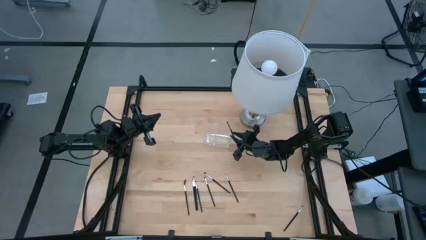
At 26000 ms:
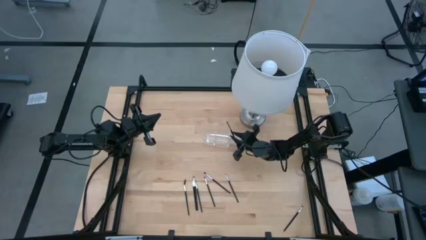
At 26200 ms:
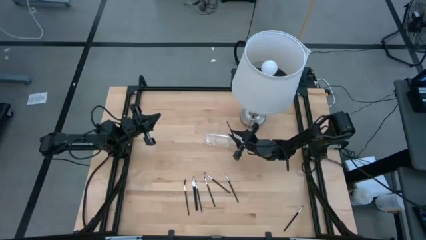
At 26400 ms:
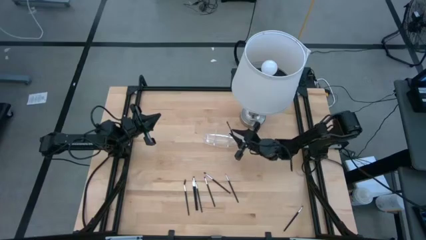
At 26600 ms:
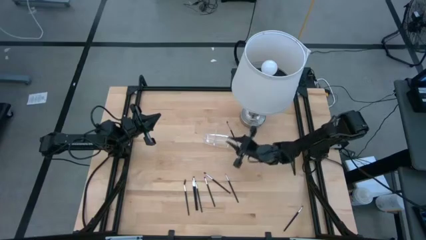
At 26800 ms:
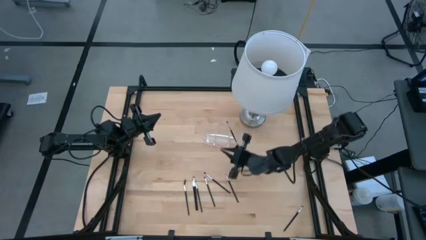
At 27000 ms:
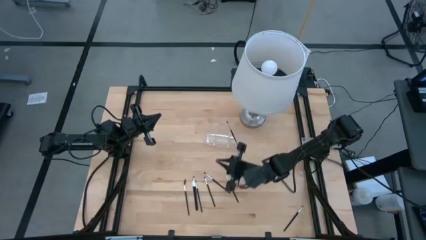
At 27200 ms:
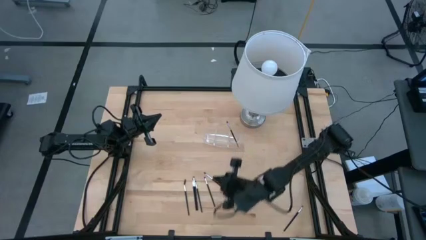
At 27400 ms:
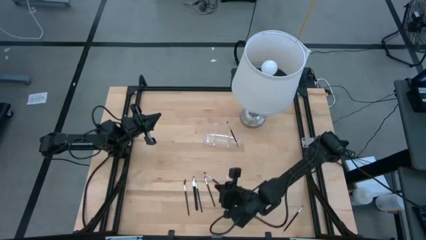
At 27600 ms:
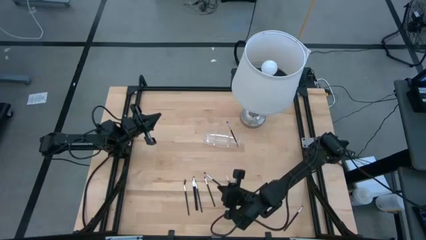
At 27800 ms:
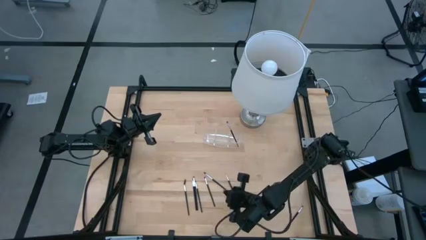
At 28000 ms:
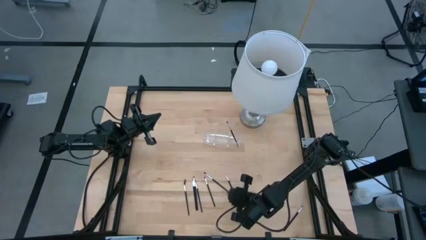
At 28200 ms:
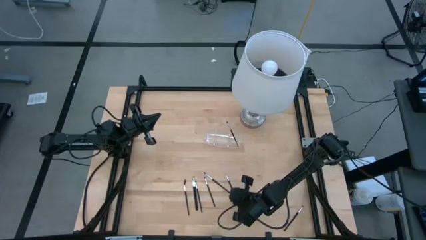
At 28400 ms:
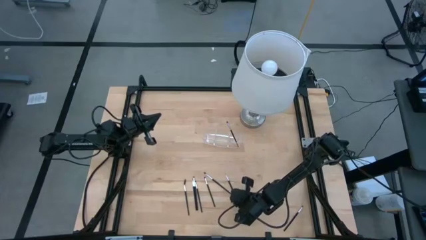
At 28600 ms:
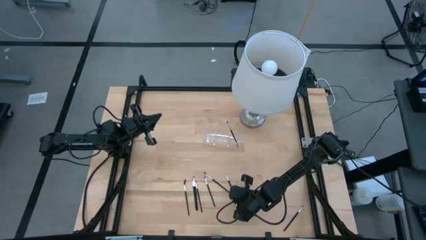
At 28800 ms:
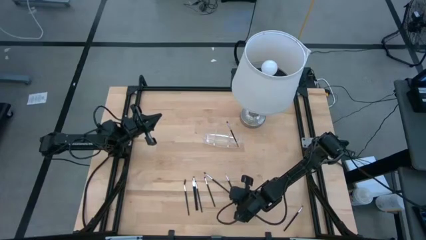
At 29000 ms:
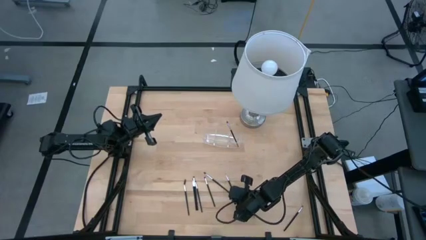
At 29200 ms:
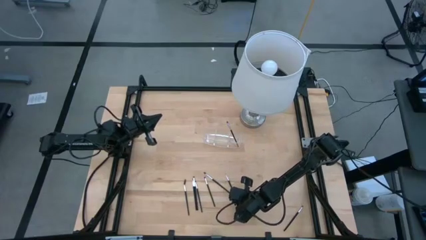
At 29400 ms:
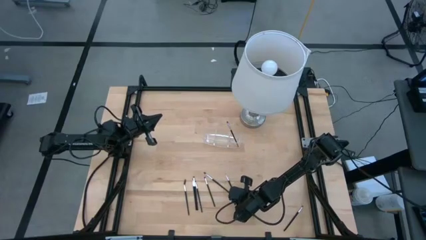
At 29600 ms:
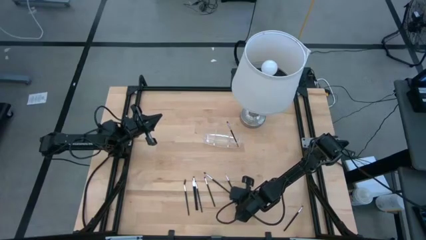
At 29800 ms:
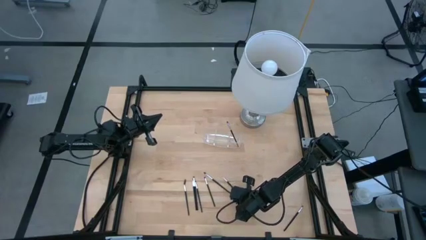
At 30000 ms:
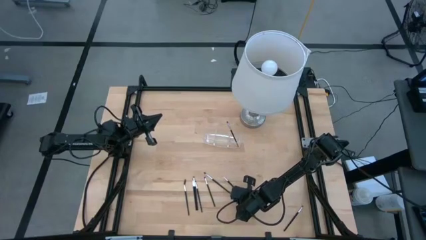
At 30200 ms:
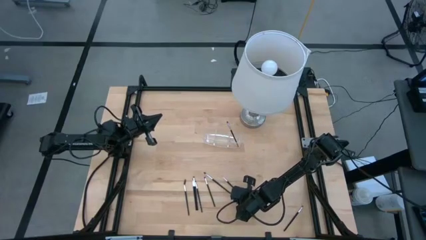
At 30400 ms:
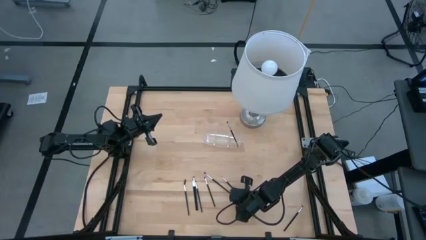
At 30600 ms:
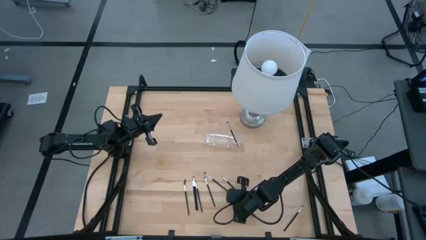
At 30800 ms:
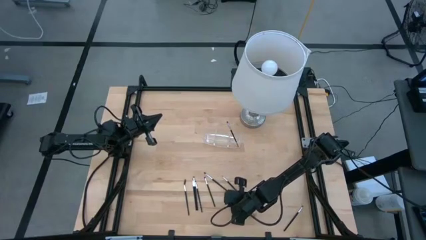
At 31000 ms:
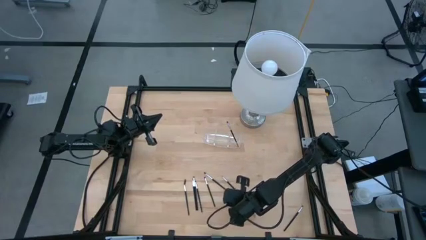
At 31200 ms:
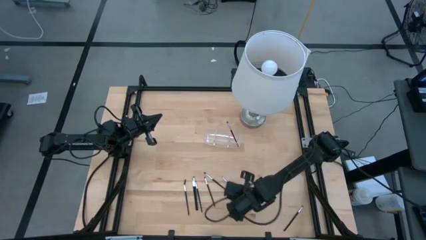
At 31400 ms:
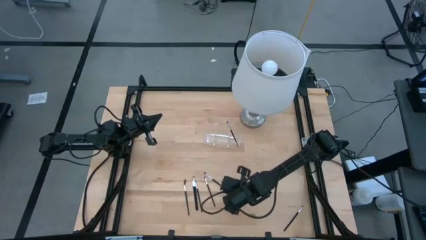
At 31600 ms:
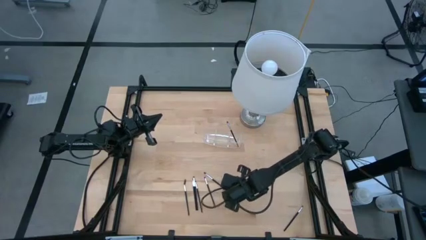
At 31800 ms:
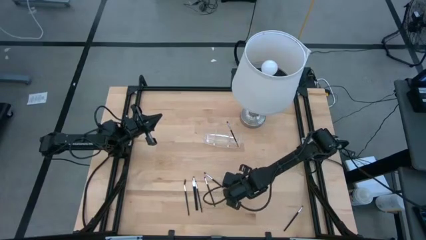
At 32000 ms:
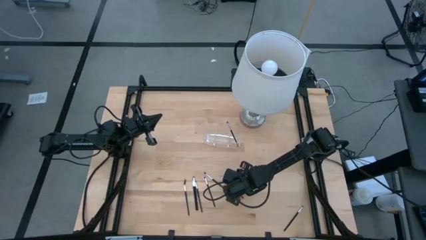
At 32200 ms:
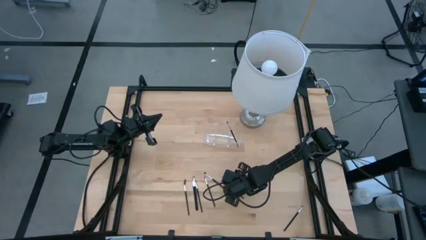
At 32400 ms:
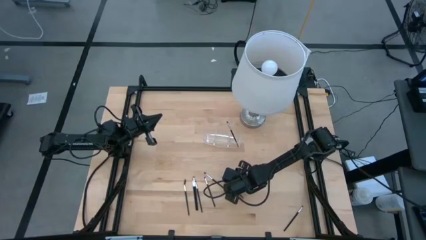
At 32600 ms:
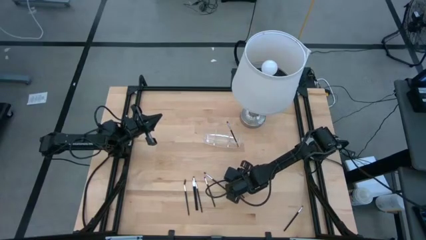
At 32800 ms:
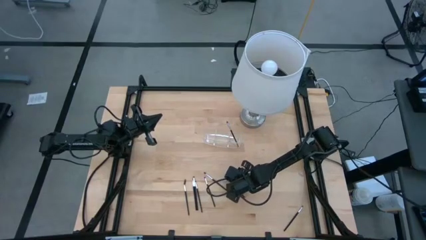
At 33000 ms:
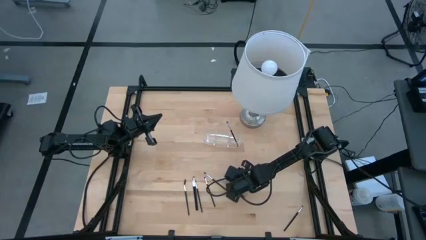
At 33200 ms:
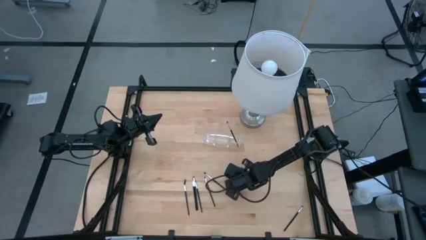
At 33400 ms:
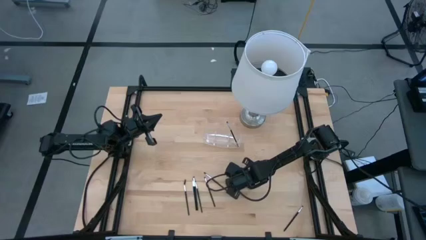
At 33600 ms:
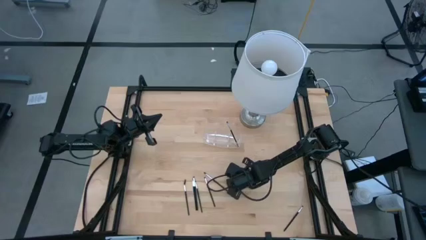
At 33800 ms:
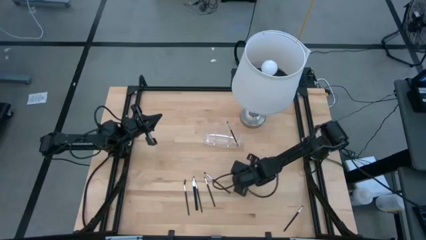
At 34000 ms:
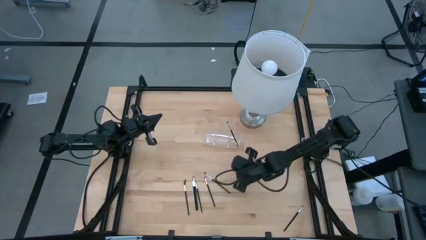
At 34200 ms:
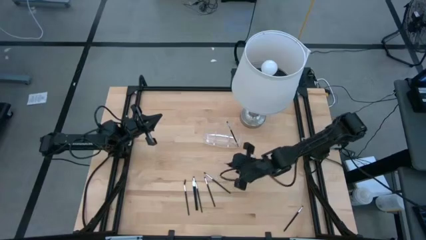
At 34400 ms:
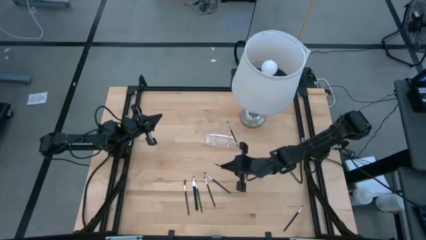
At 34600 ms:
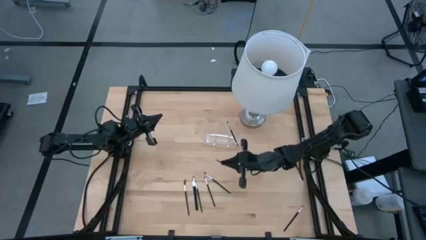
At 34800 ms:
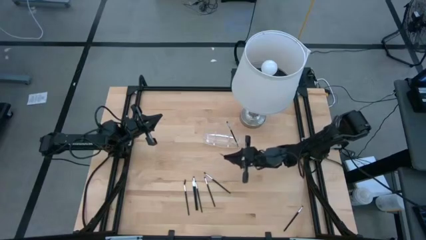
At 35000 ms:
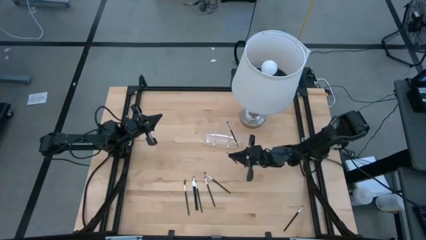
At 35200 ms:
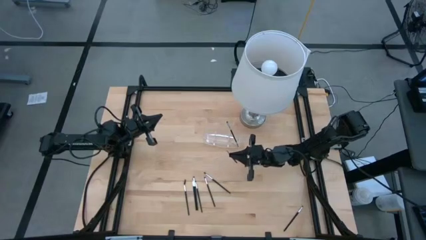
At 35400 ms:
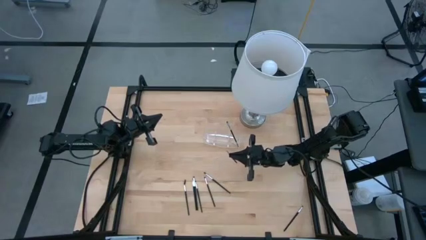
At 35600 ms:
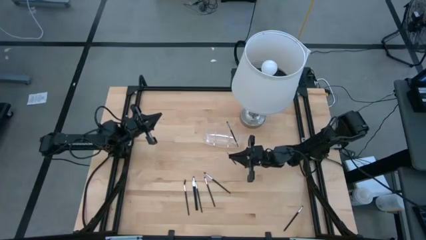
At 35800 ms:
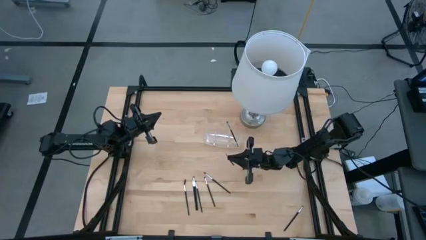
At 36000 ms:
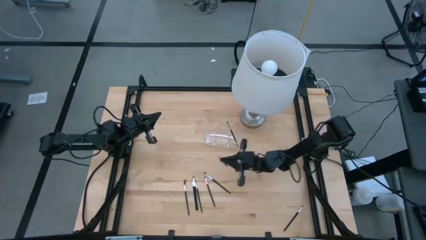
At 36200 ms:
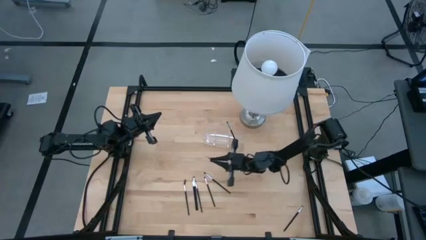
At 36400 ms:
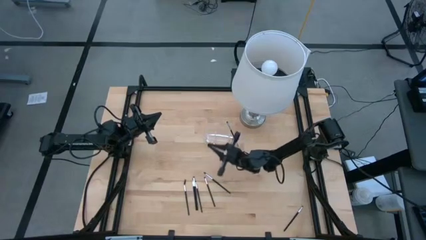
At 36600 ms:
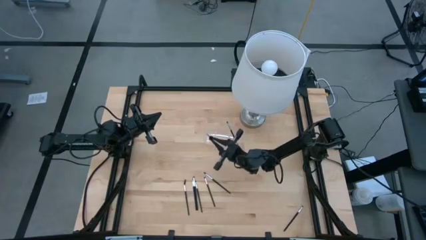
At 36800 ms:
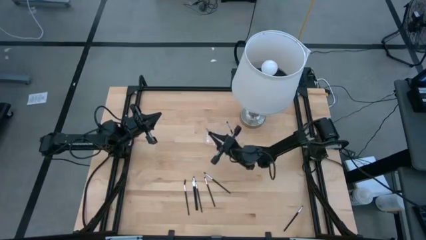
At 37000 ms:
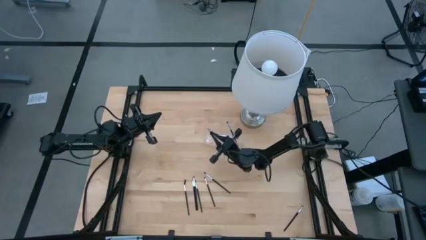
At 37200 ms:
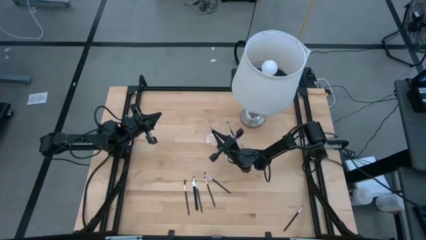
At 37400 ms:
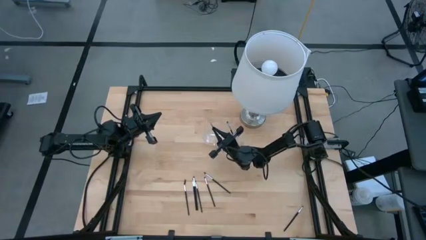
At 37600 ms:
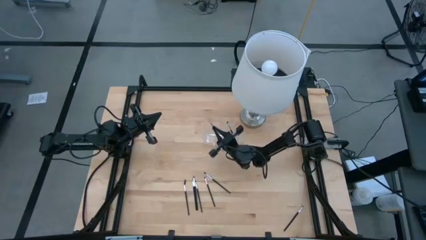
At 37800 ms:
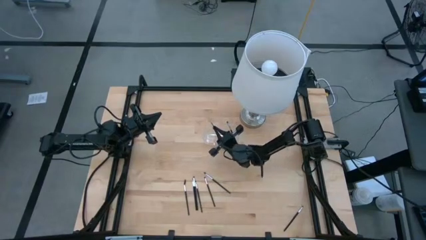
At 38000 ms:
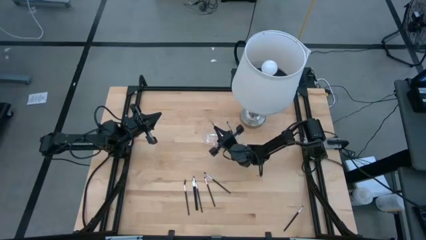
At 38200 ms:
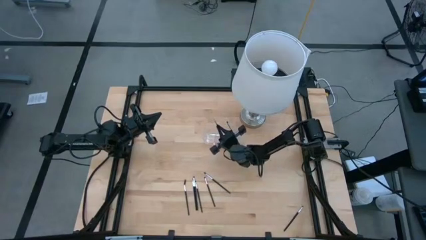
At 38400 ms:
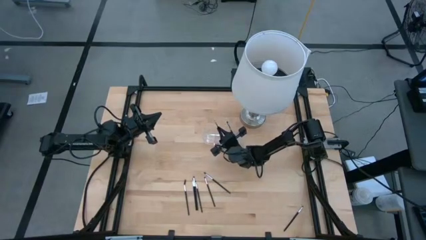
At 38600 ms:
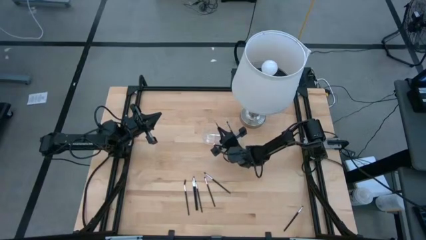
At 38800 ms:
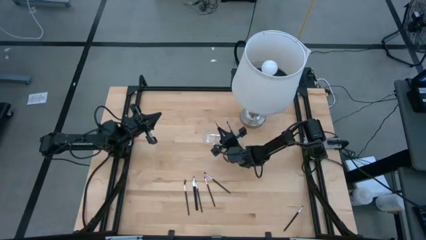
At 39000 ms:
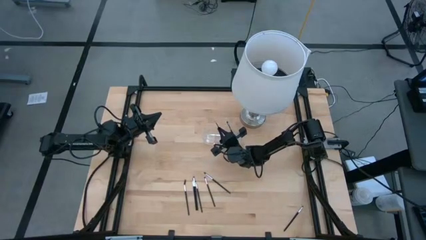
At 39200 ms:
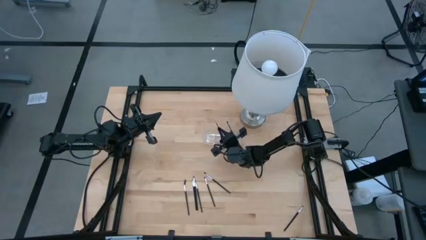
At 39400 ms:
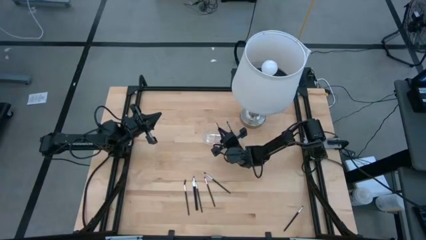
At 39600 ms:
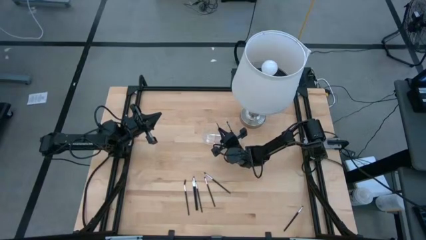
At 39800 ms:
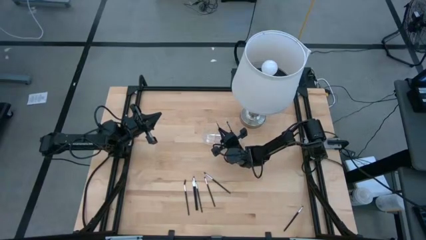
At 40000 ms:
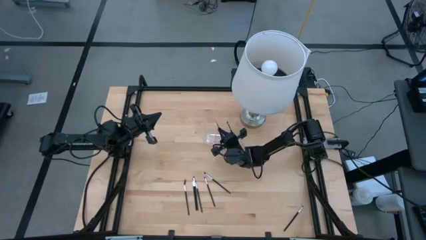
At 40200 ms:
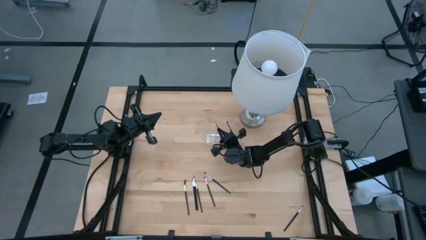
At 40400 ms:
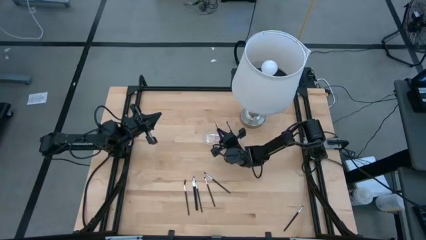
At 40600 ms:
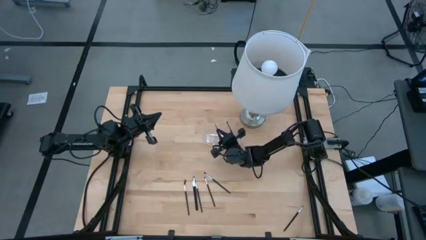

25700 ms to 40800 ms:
Task: Pick & Place Makeup Brushes
Put the black liner brush into the transparent organizer
